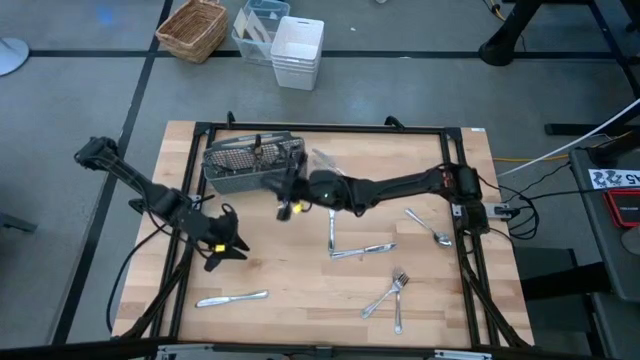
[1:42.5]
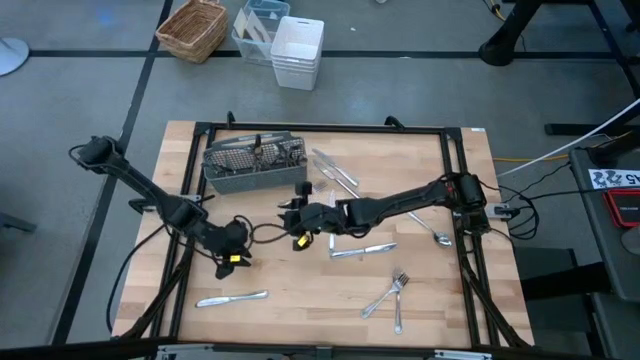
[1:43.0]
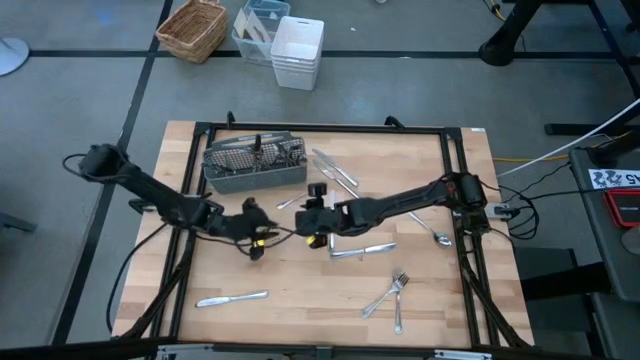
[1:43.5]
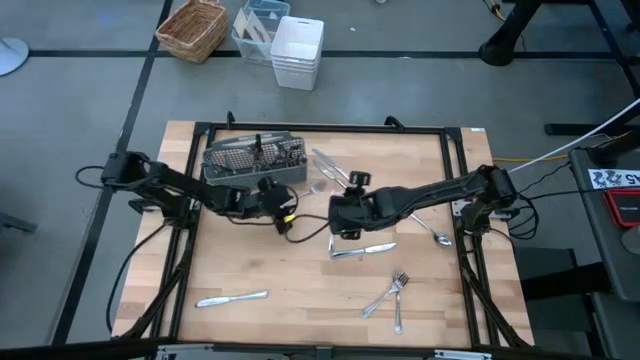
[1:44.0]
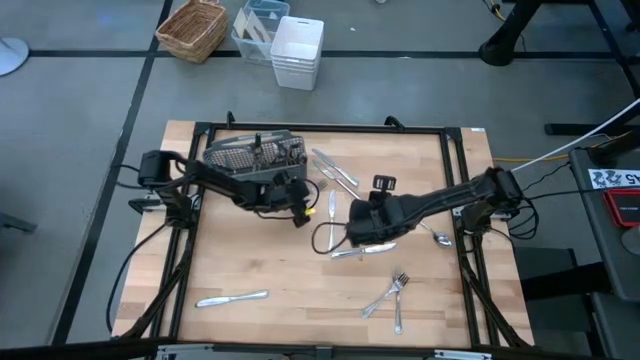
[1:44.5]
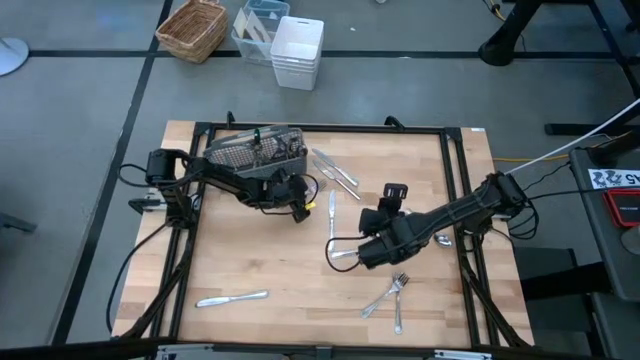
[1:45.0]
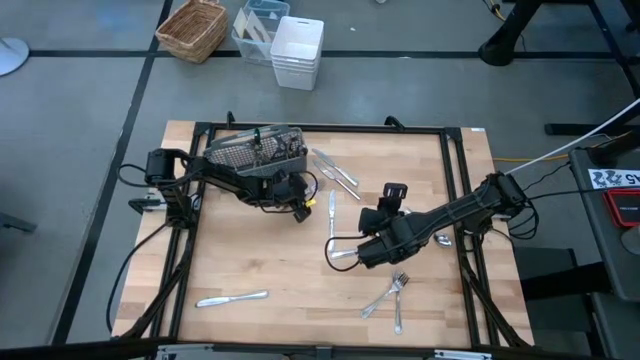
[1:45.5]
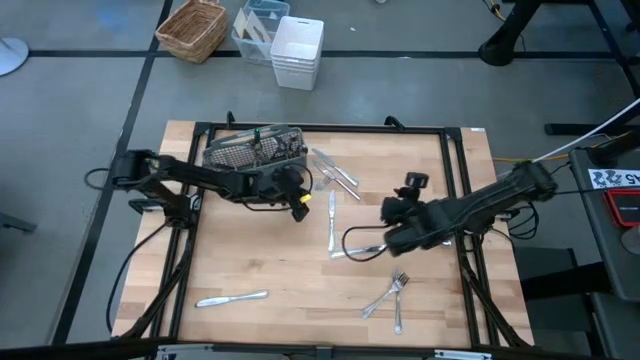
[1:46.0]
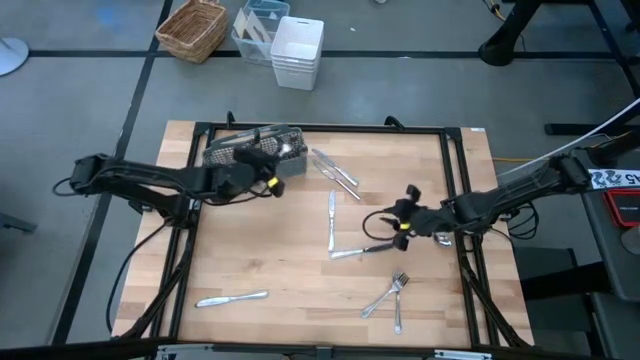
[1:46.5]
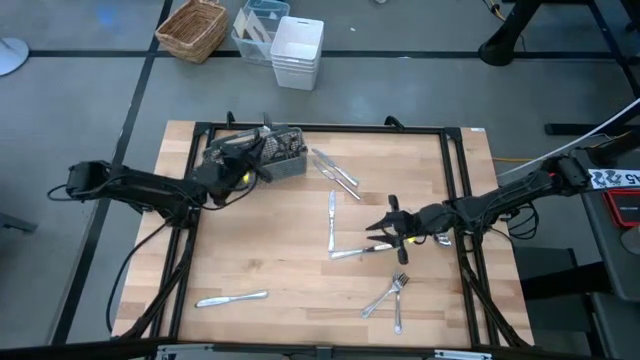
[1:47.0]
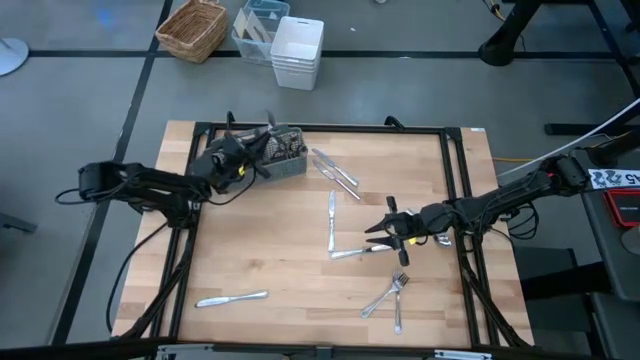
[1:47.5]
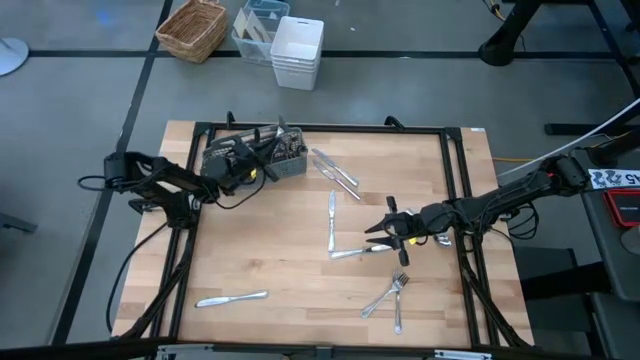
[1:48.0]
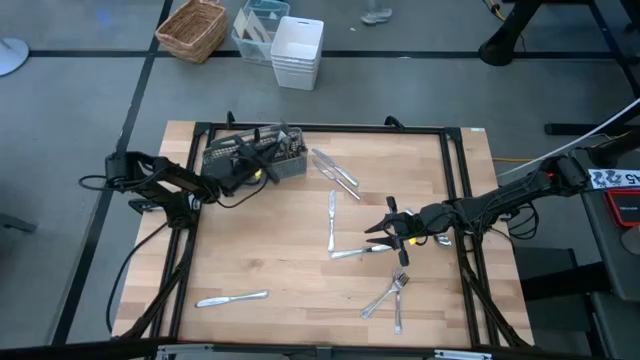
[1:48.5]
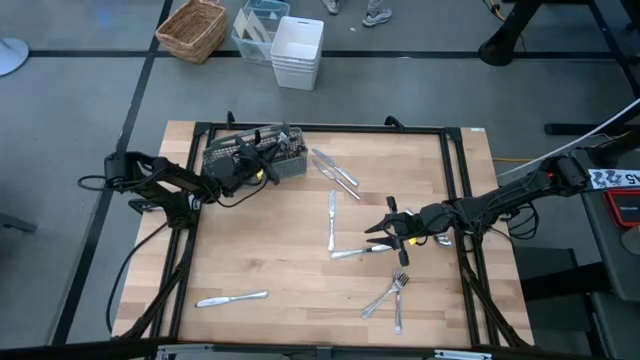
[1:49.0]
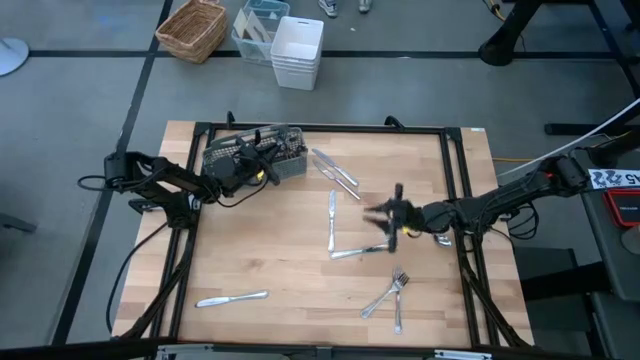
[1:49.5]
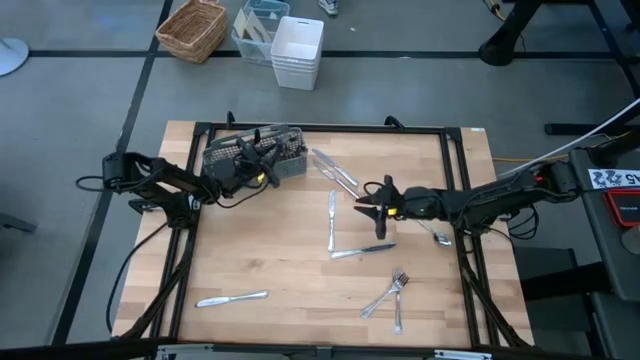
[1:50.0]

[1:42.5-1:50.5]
Task: Sort silverware
Put the silver fork into the silverware rack

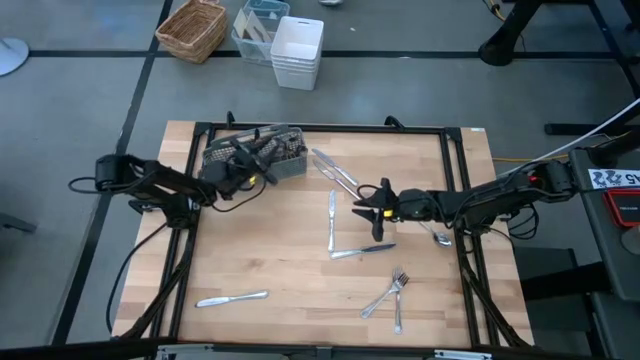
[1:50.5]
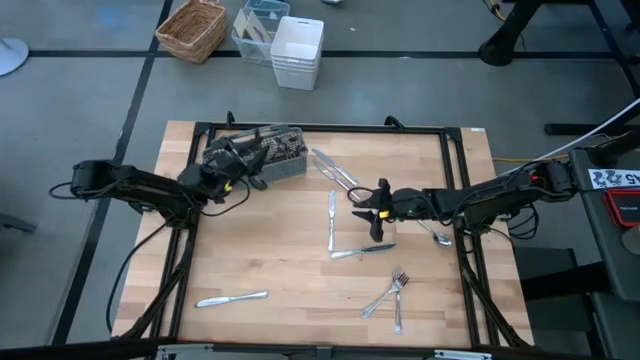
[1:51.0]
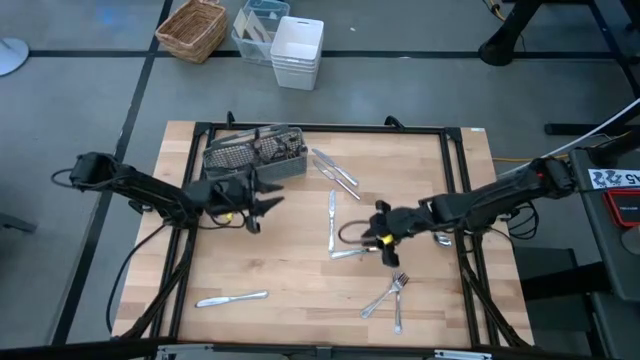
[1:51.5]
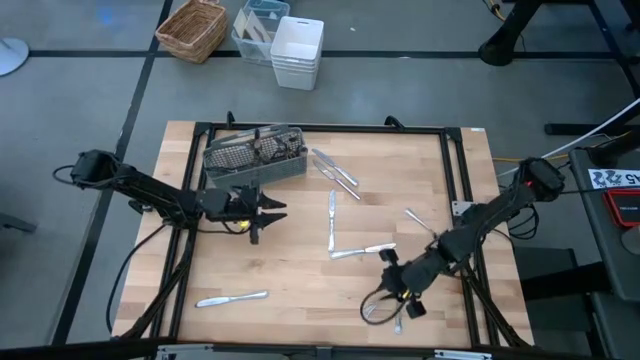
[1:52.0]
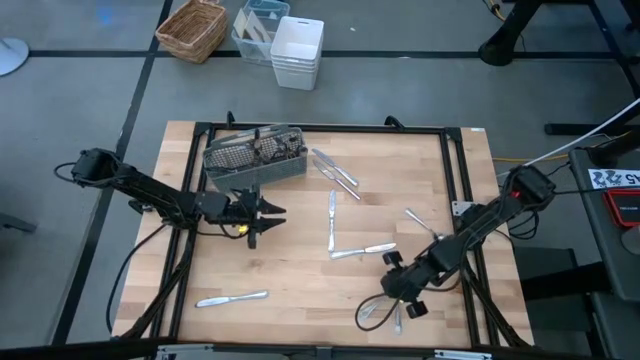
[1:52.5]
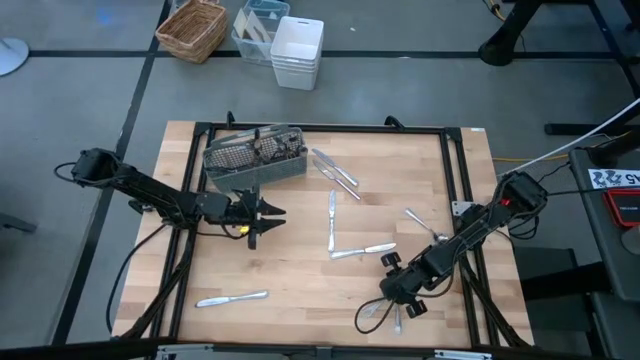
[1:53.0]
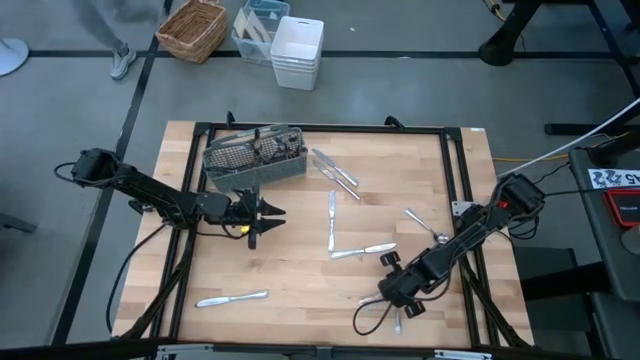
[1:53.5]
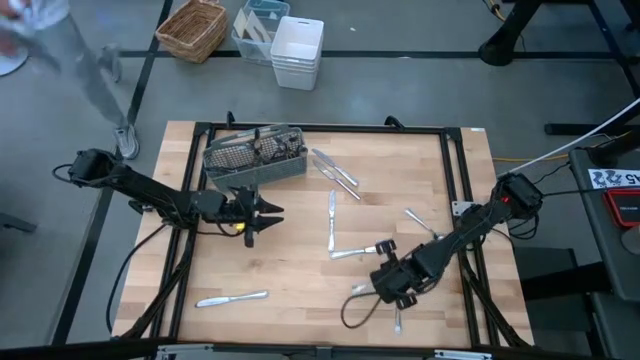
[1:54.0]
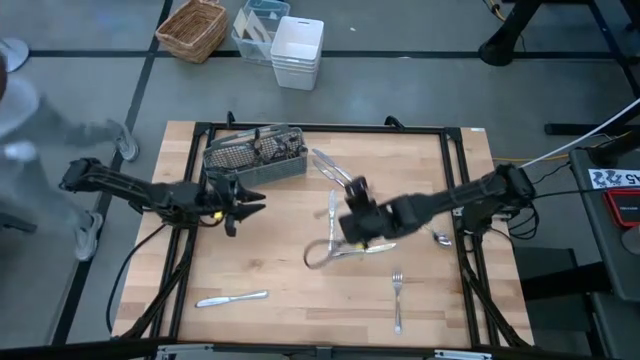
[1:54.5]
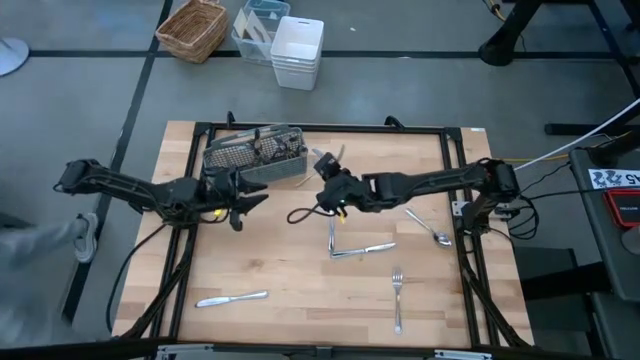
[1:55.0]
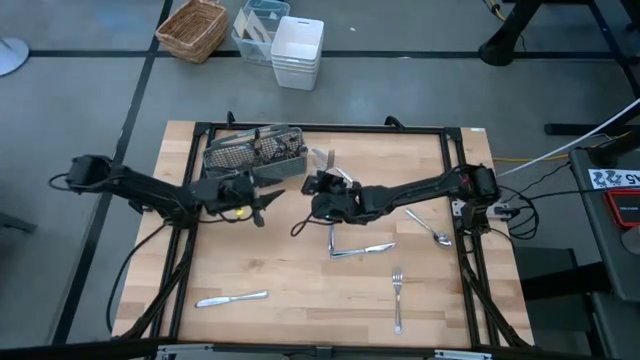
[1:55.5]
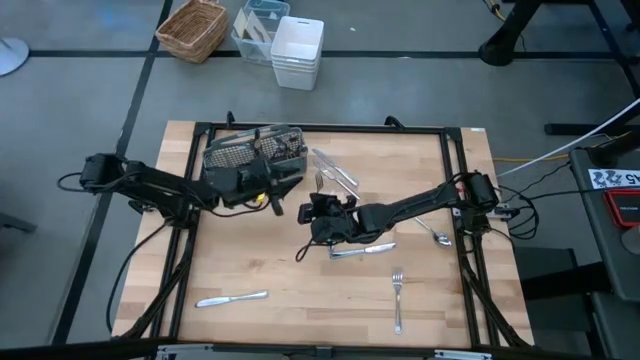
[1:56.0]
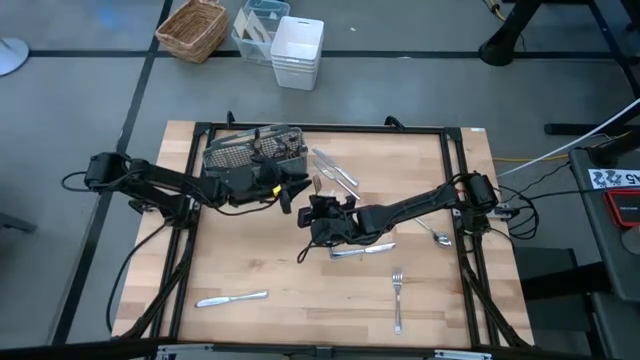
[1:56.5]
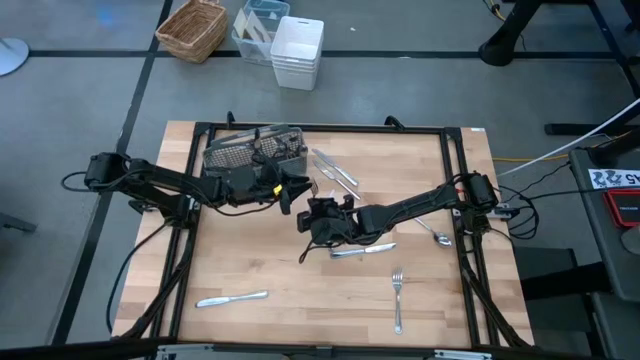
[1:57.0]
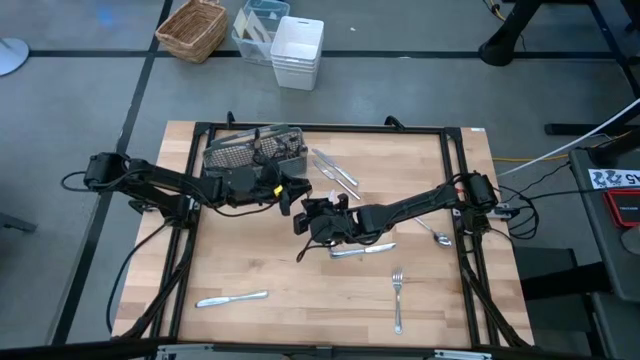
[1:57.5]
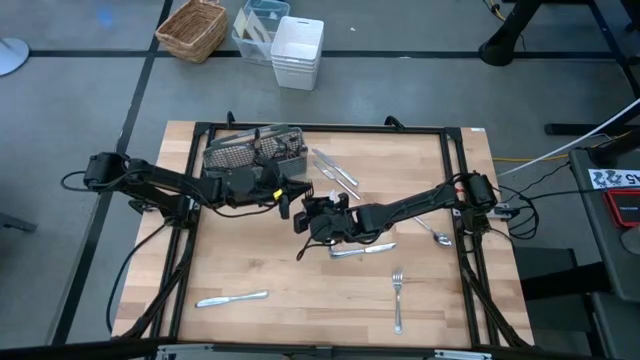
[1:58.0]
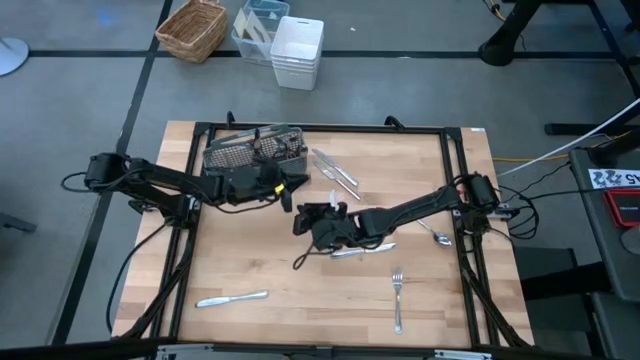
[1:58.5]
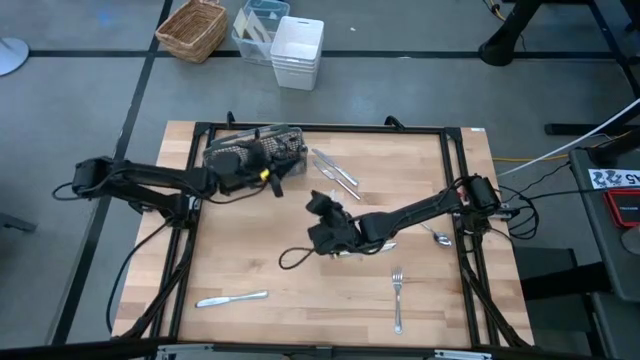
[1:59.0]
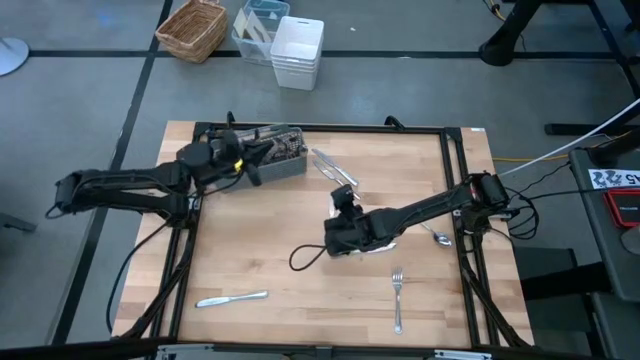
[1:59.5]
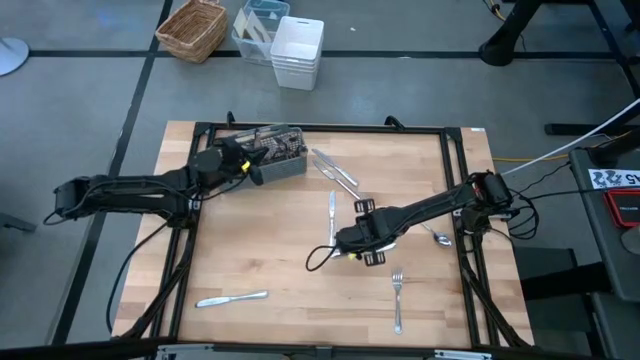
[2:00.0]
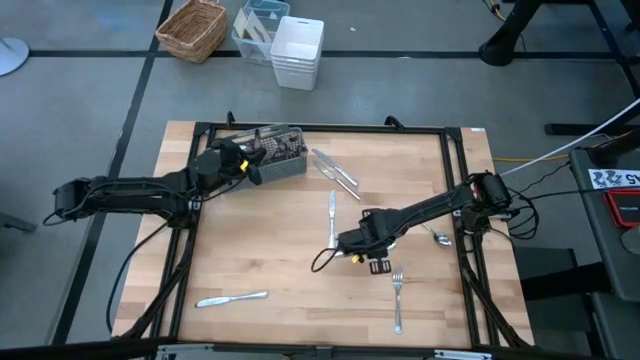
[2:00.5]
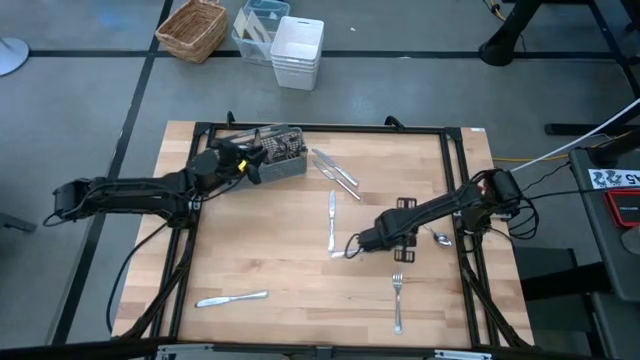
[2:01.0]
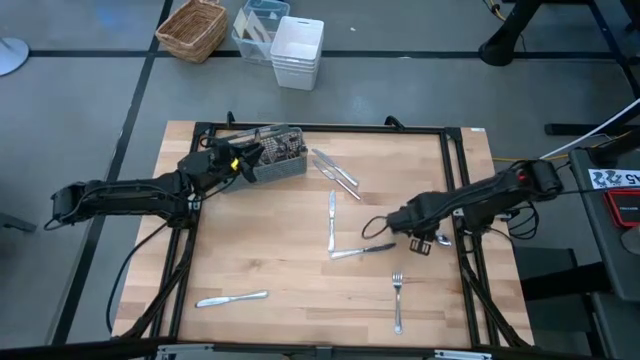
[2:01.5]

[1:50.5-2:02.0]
Put the silver fork into the silverware rack

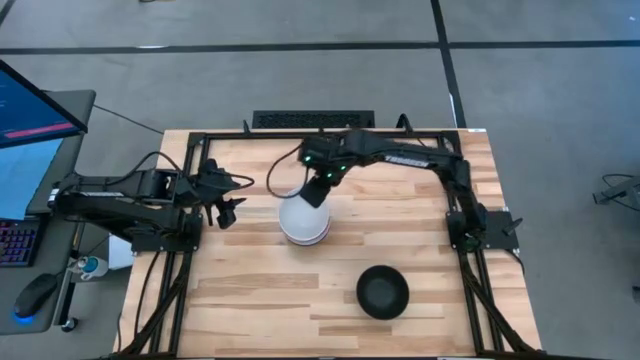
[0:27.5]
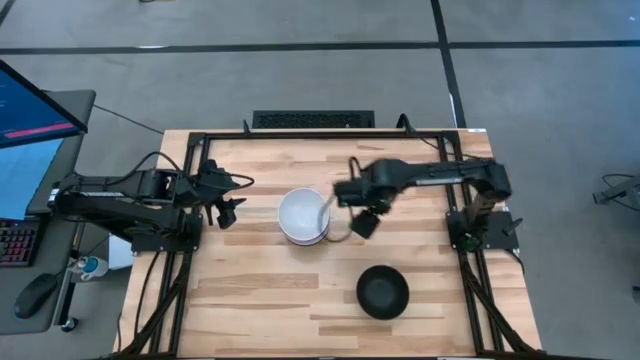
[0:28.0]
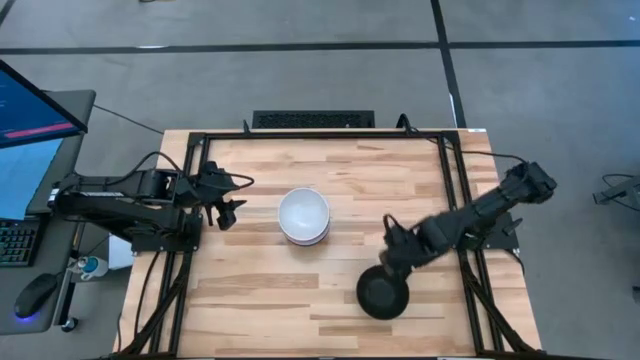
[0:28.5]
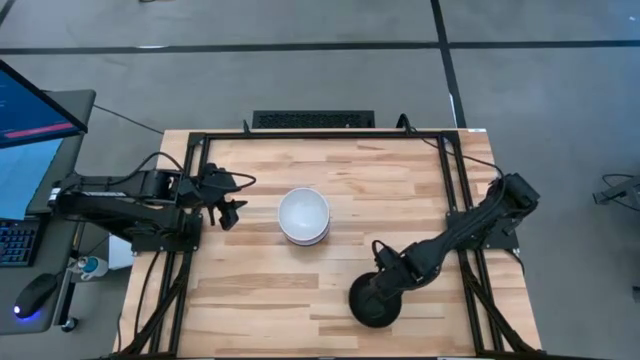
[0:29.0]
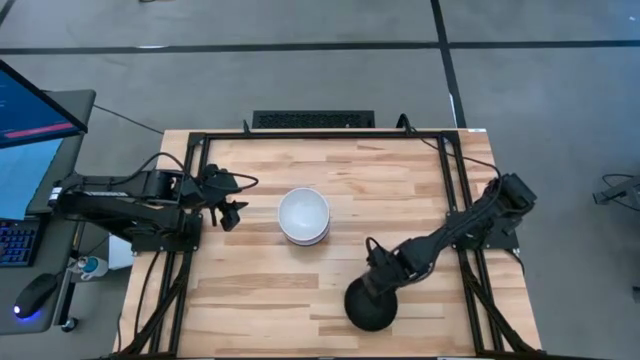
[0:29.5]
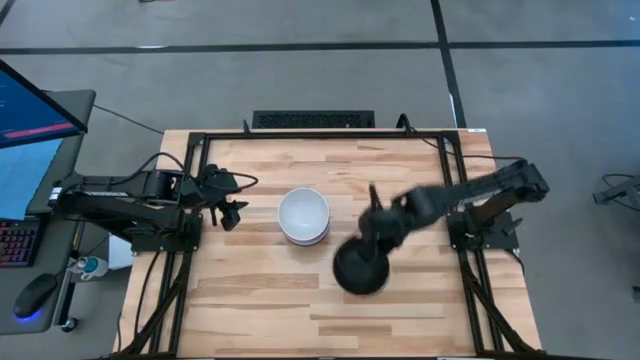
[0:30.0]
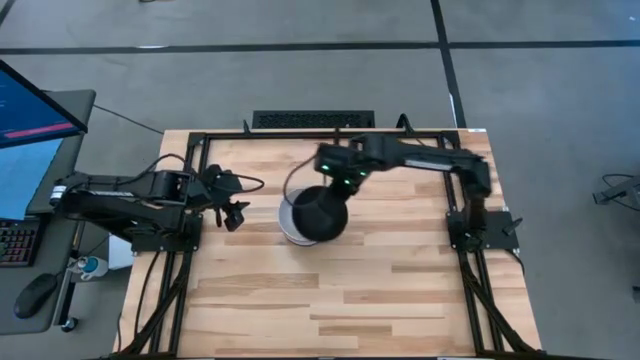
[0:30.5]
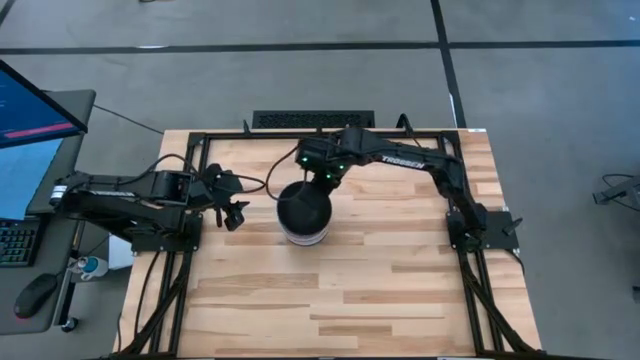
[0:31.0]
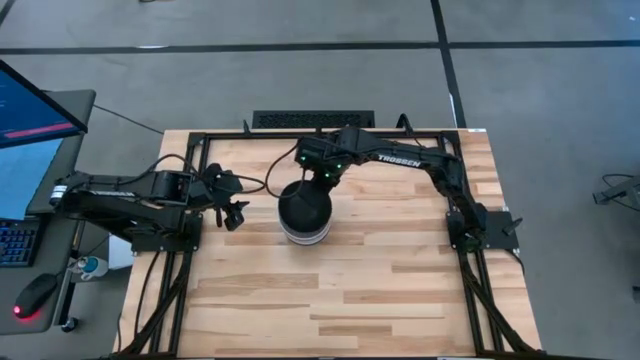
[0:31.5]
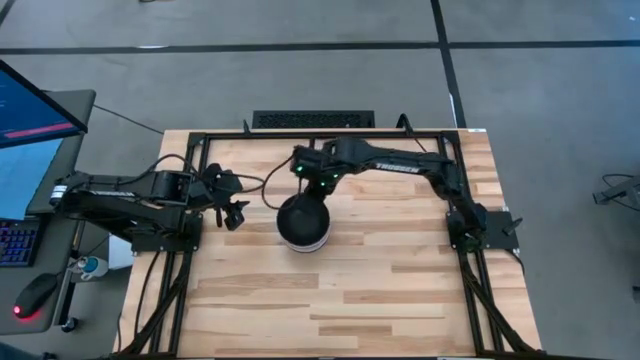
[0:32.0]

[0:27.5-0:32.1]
Task: Nest bowls inside each other
Stack the black bowl on the white bowl
